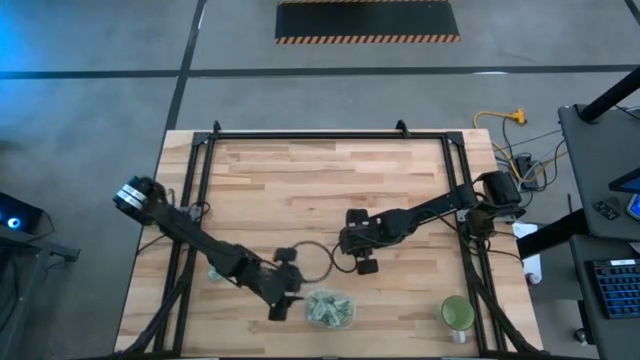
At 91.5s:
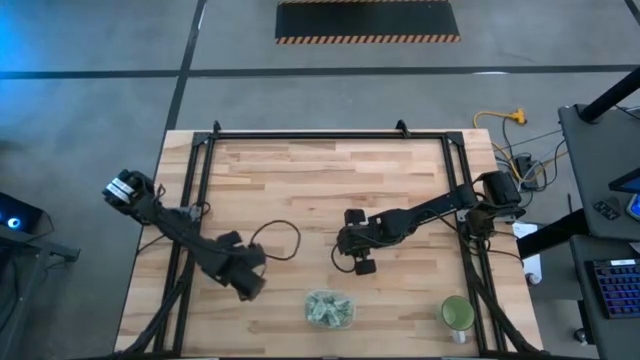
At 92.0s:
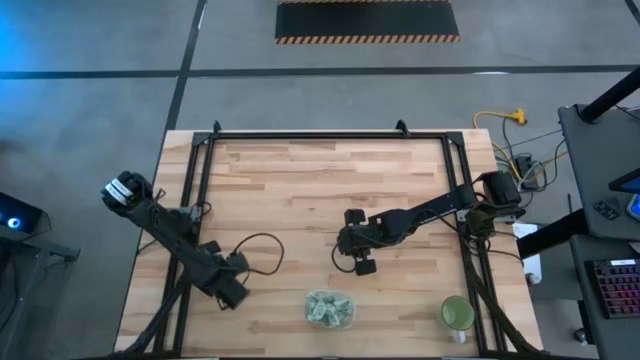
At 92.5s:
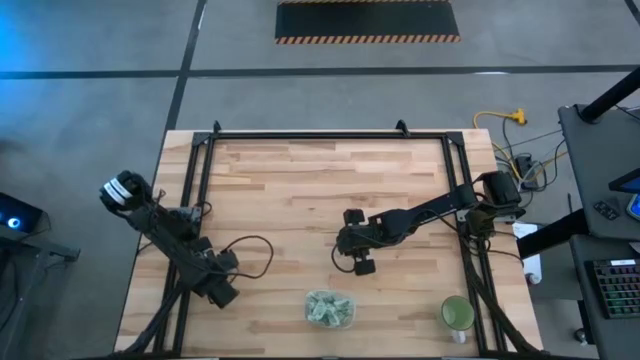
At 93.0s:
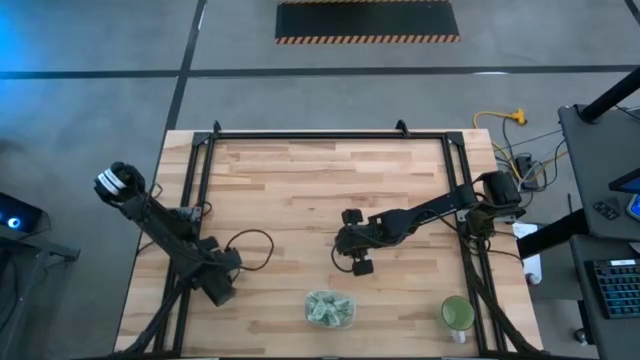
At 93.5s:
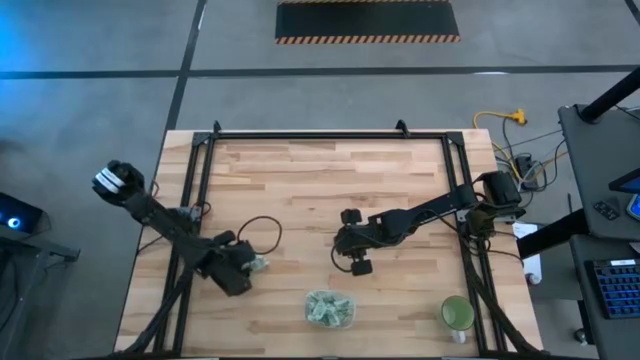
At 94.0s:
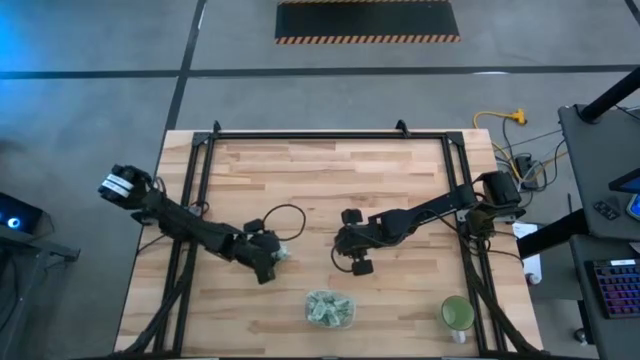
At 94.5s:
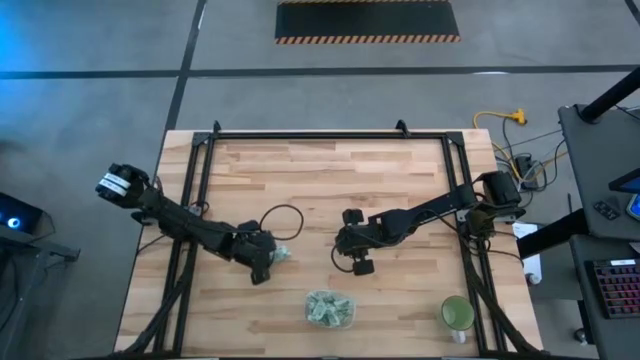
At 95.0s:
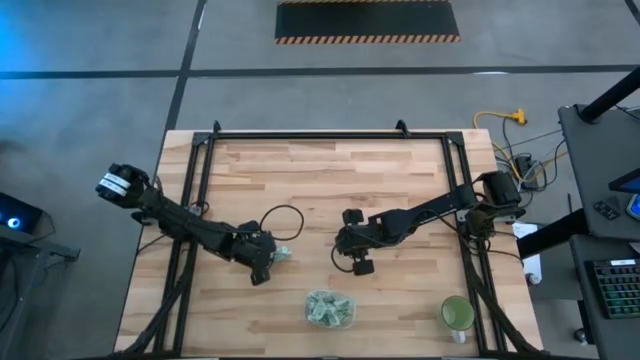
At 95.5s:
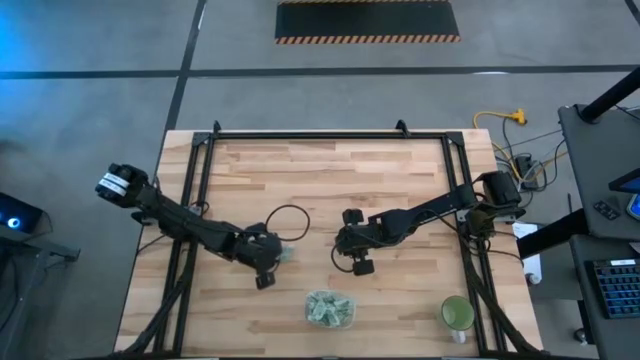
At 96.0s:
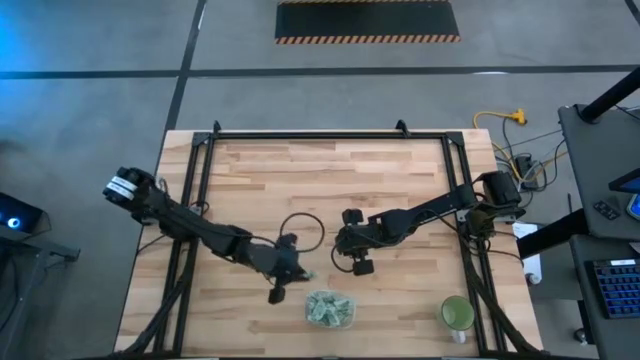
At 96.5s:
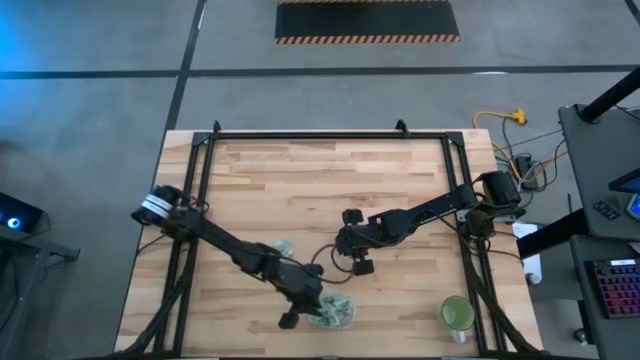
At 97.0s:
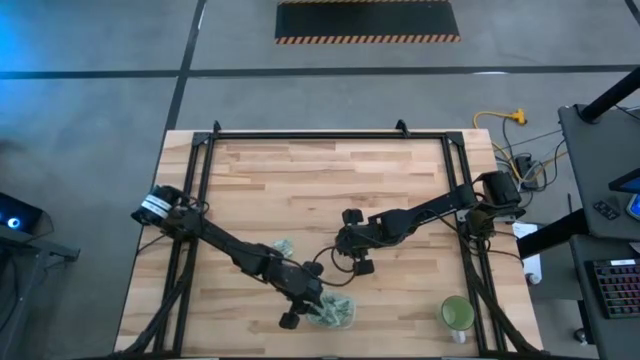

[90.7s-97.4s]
Task: Pick and place Stevia / Truvia into bins
Put the stevia packet into the transparent container

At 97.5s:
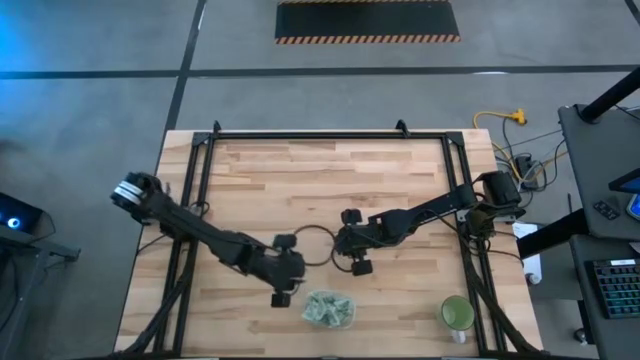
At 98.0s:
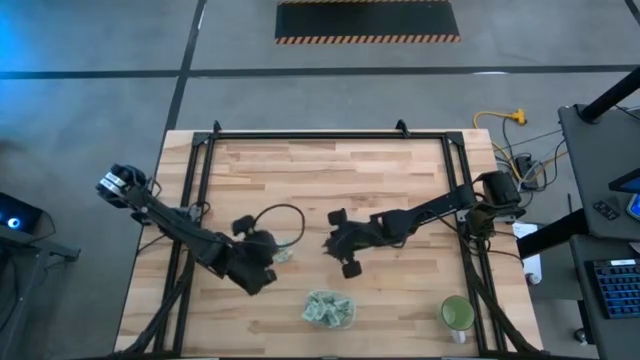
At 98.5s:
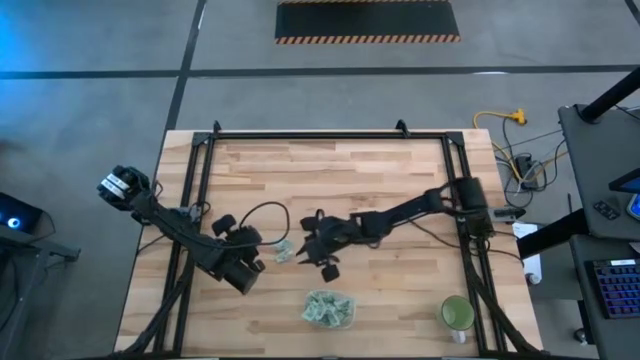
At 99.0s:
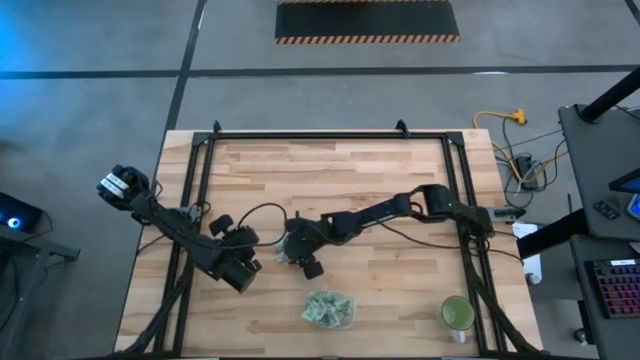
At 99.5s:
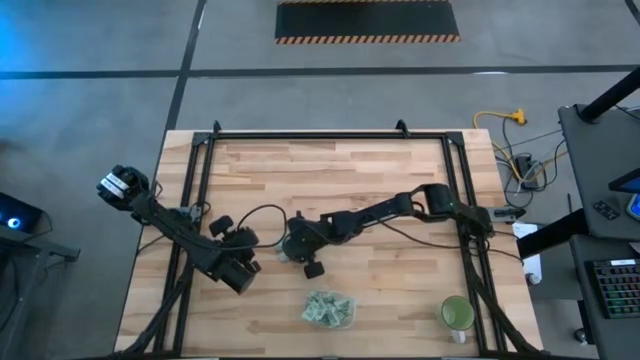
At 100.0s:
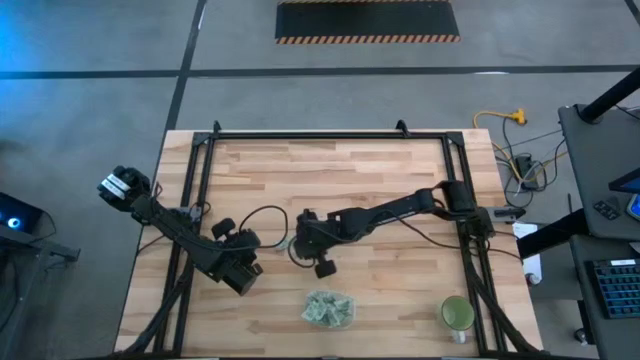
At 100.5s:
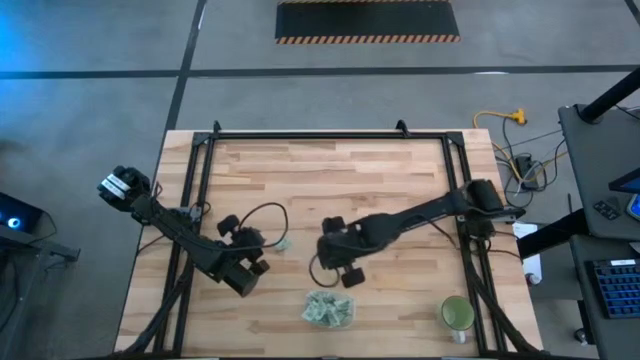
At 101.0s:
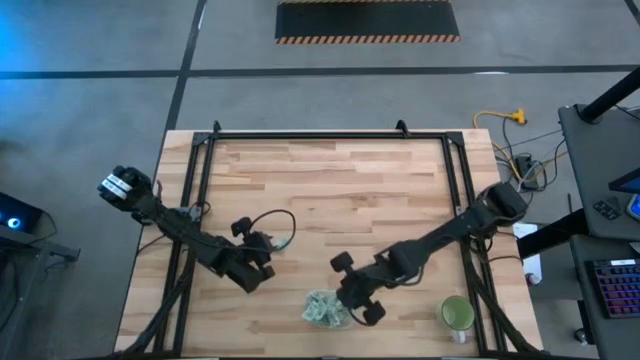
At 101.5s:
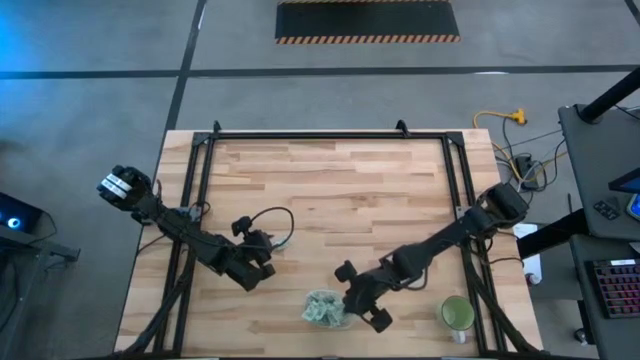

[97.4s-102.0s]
Put the stevia packet into the transparent container

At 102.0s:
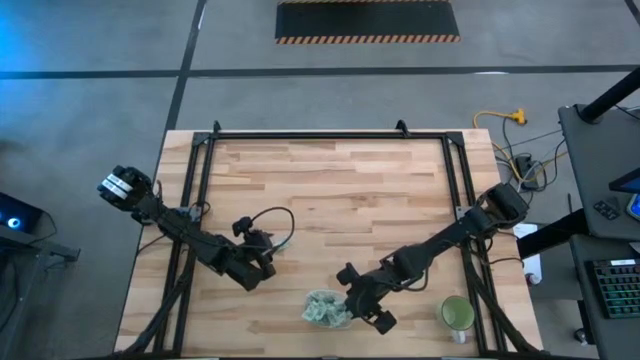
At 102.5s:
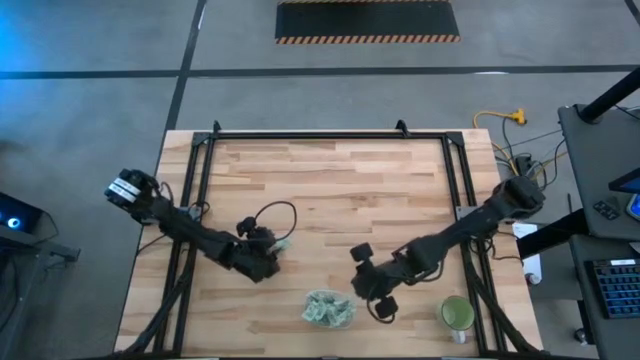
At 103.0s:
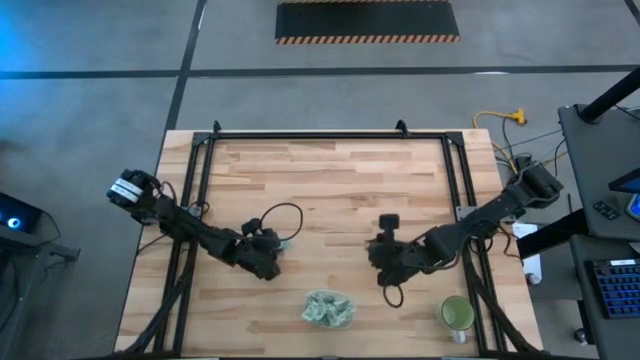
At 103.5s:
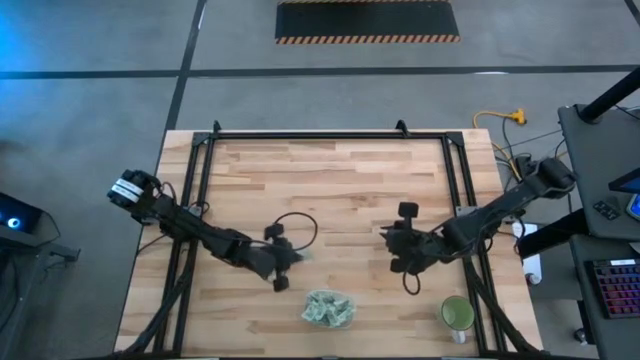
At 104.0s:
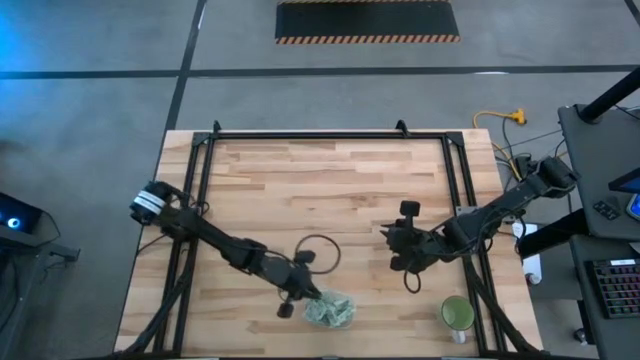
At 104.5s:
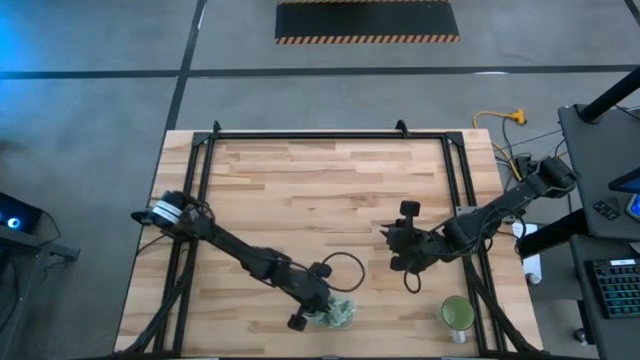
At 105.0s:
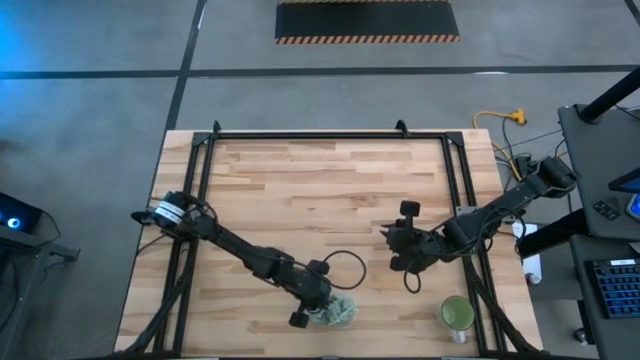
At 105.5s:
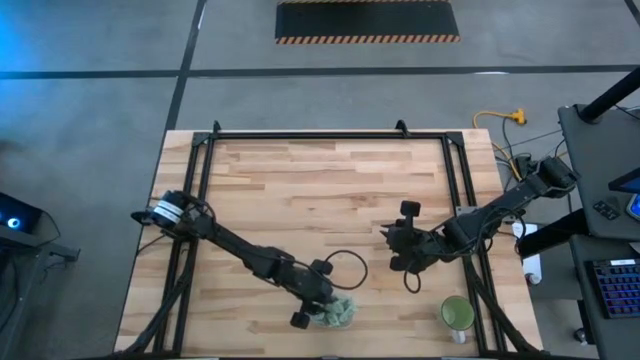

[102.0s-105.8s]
Put the stevia packet into the transparent container

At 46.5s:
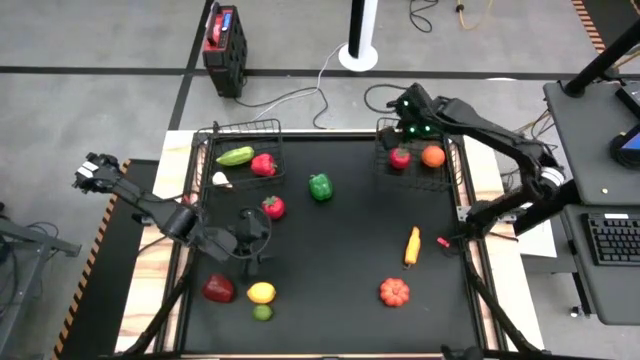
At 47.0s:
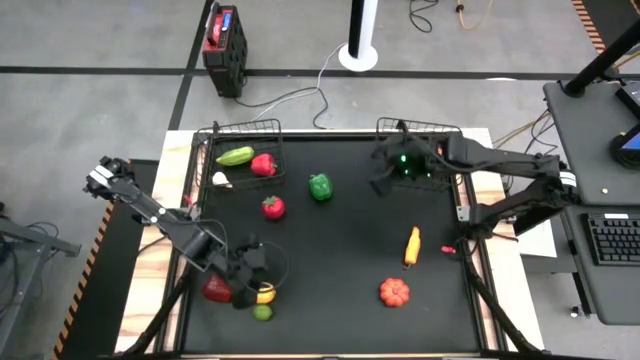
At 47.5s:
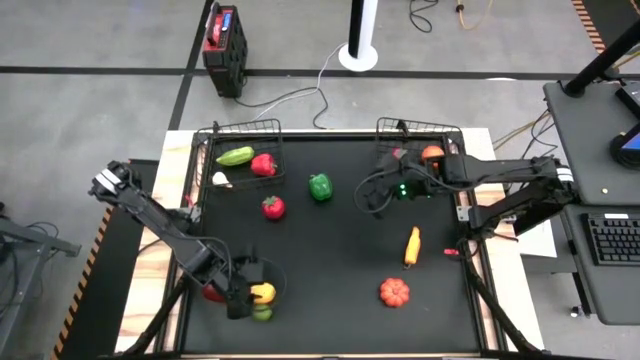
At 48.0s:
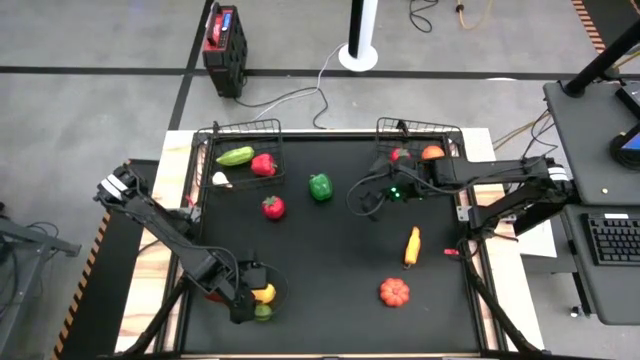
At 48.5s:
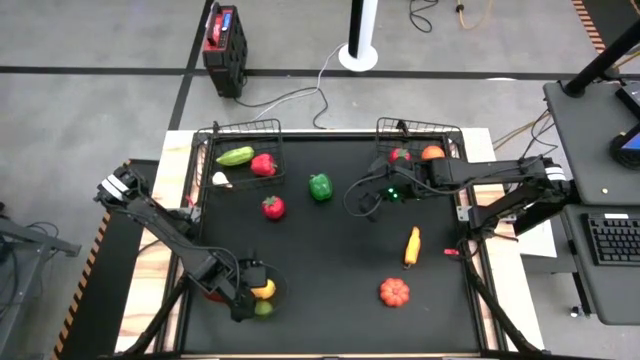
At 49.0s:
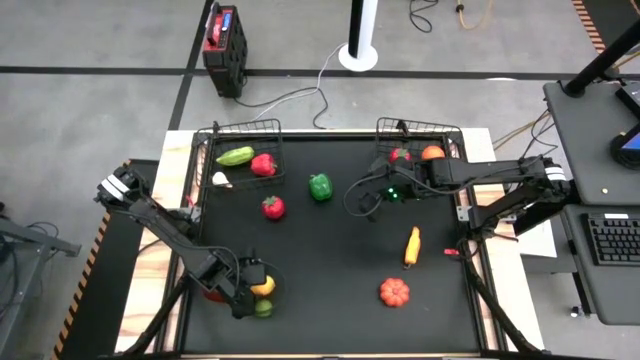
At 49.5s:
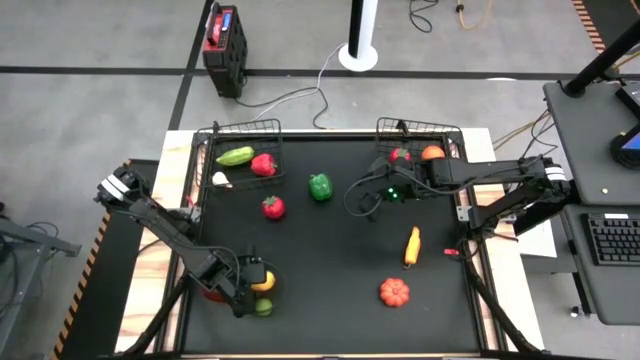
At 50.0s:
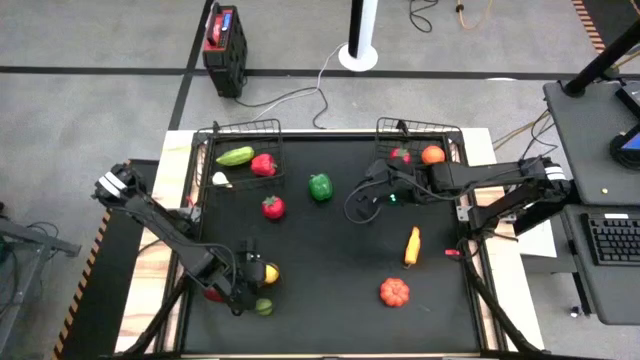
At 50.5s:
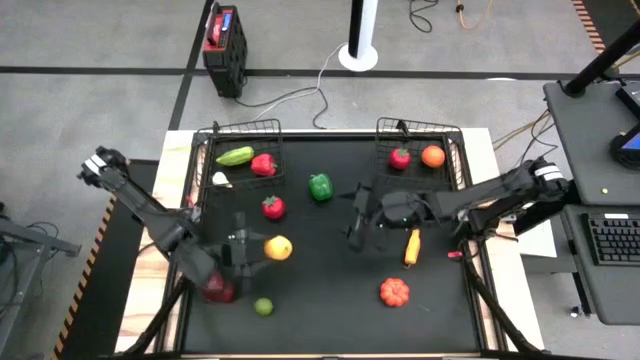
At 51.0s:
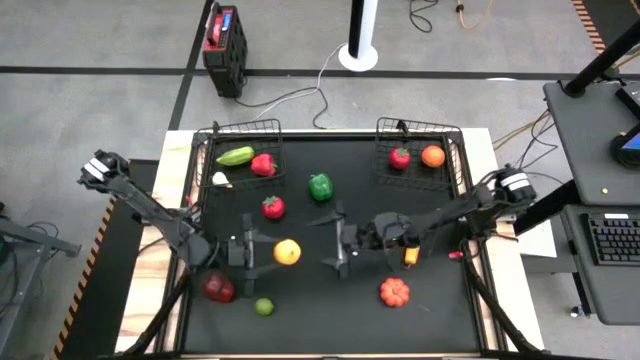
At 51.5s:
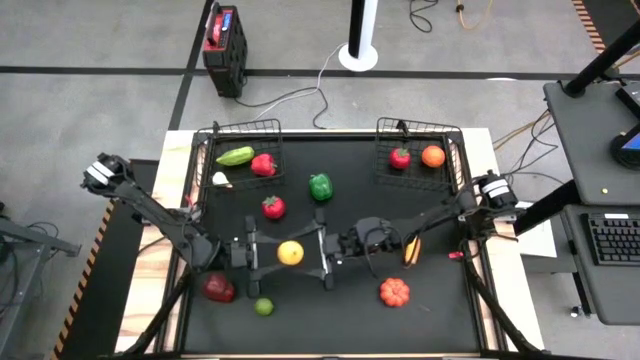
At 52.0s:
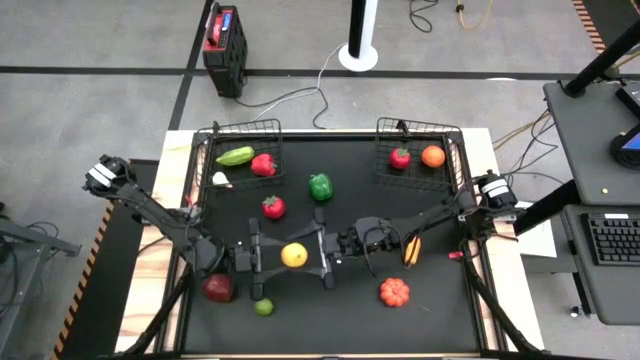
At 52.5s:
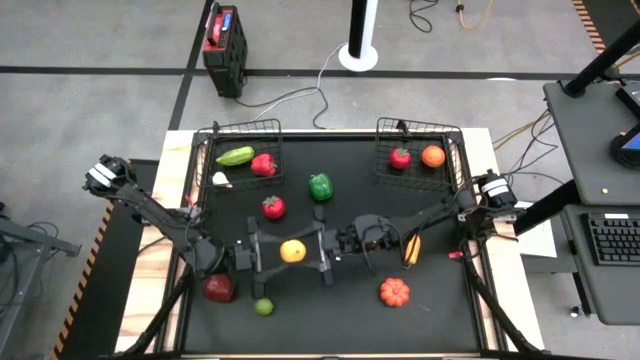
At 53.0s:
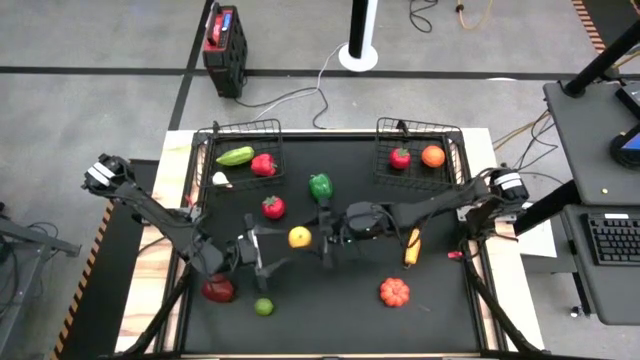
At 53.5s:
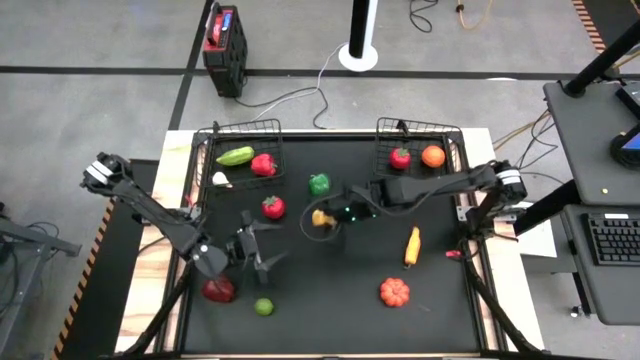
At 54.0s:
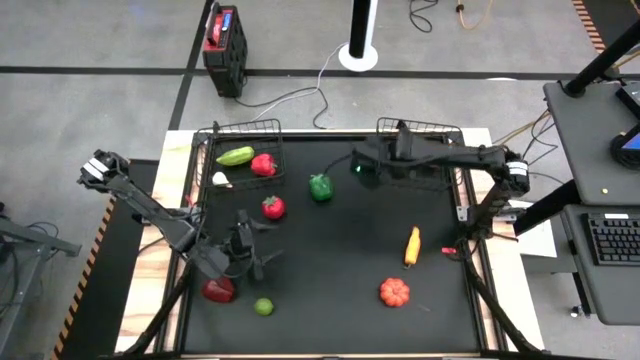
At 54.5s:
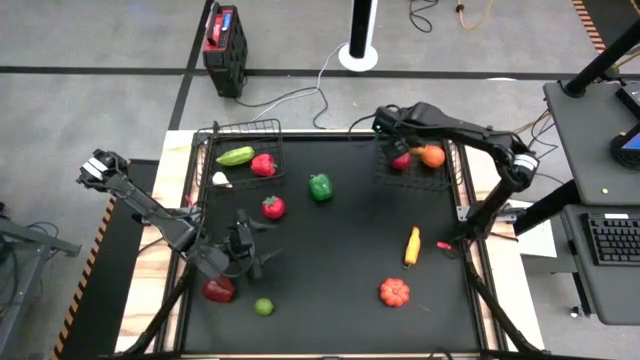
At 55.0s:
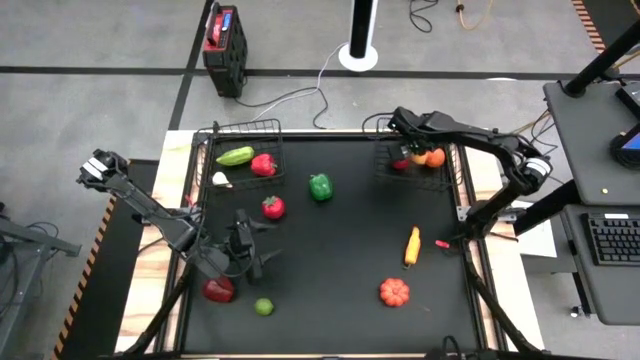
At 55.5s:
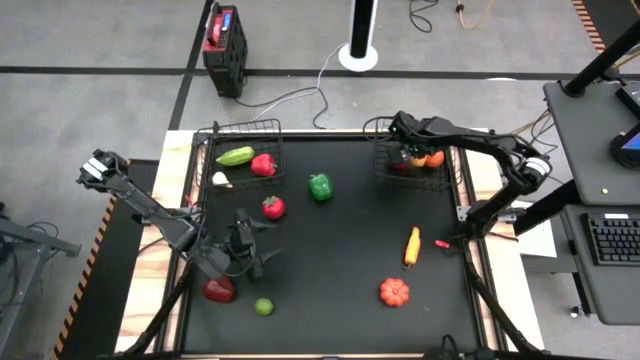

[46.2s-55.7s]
Task: Sort produce into baskets
Put the lemon into the right wire basket
